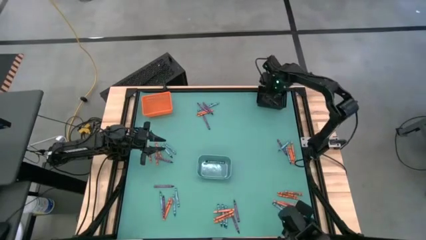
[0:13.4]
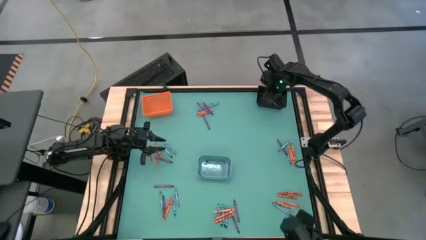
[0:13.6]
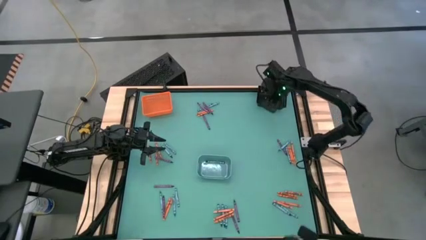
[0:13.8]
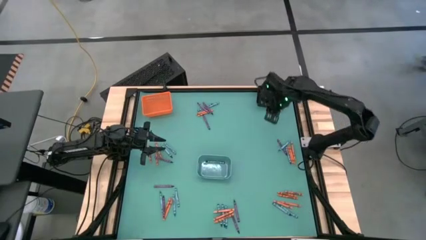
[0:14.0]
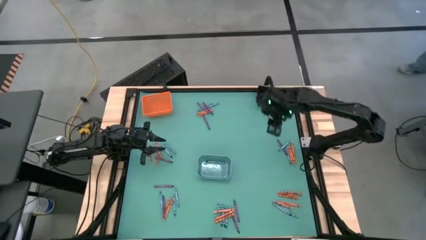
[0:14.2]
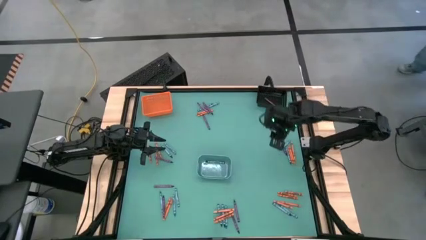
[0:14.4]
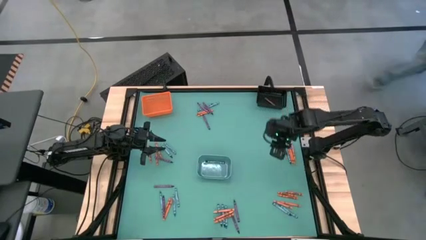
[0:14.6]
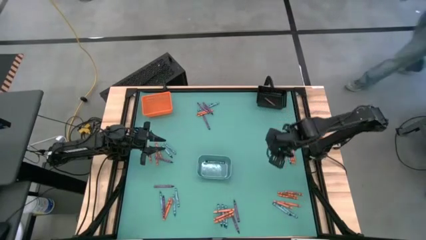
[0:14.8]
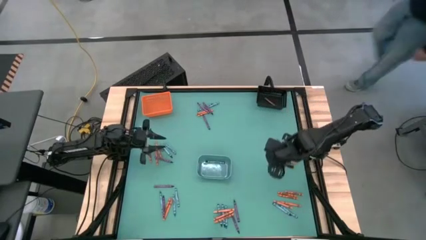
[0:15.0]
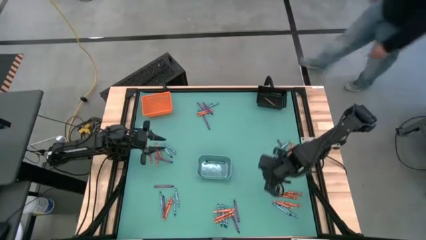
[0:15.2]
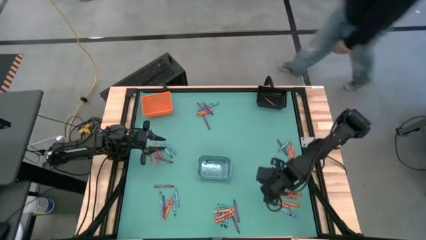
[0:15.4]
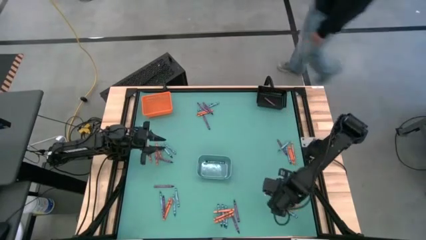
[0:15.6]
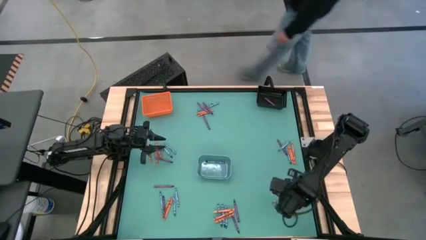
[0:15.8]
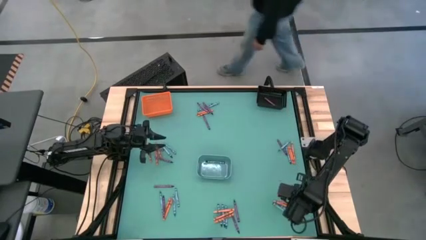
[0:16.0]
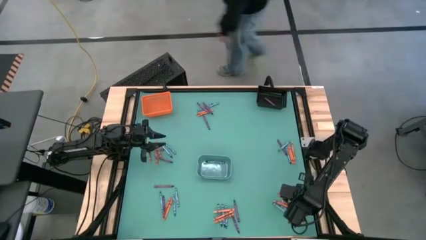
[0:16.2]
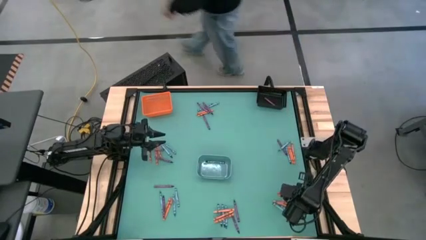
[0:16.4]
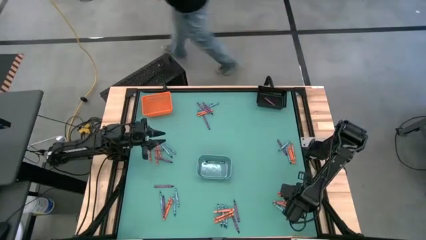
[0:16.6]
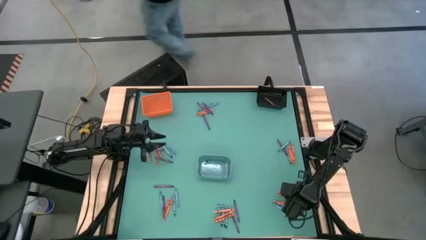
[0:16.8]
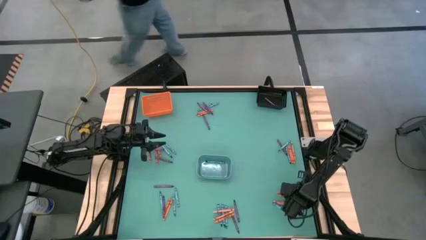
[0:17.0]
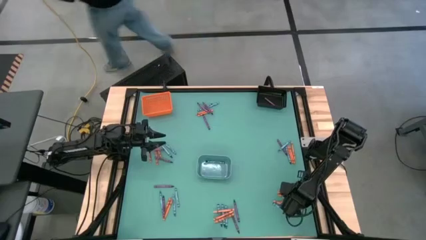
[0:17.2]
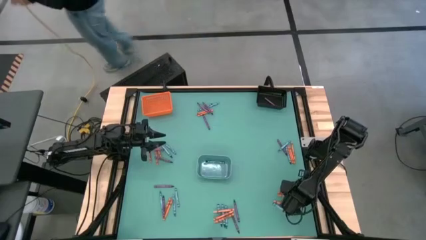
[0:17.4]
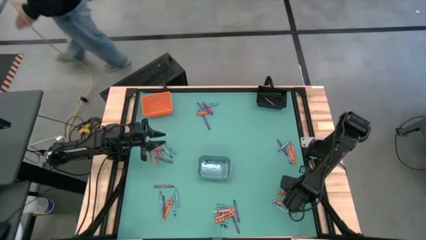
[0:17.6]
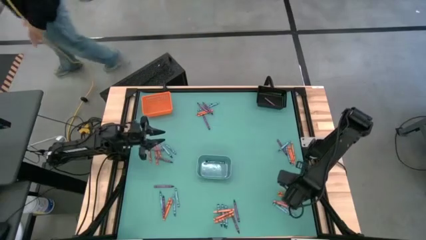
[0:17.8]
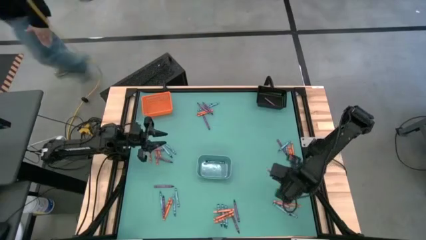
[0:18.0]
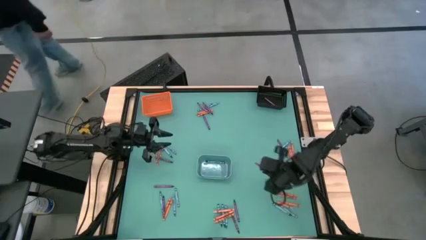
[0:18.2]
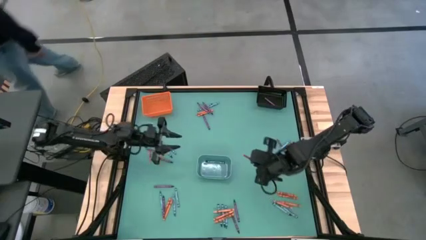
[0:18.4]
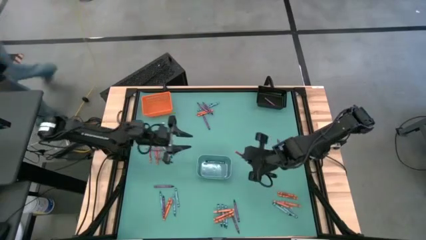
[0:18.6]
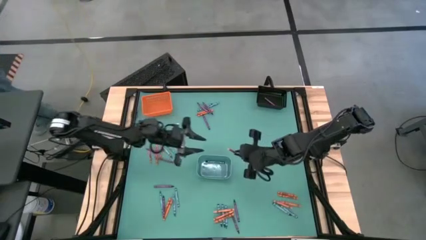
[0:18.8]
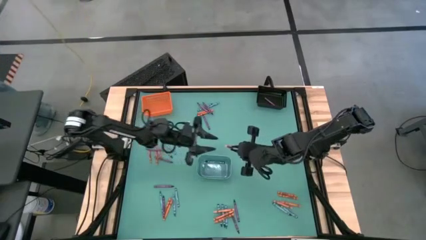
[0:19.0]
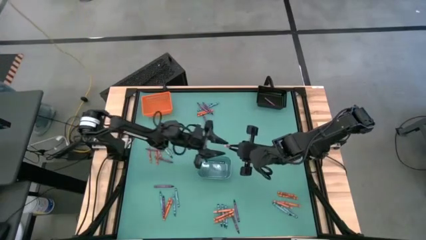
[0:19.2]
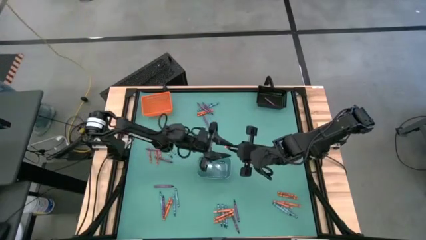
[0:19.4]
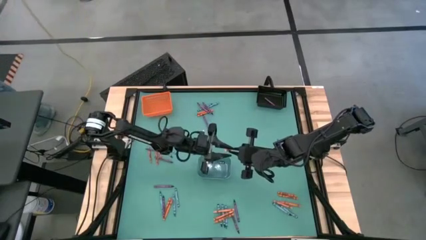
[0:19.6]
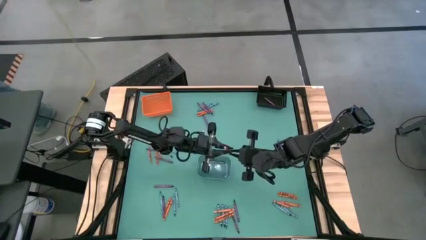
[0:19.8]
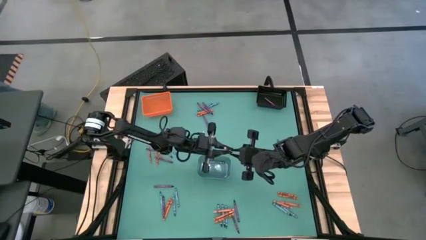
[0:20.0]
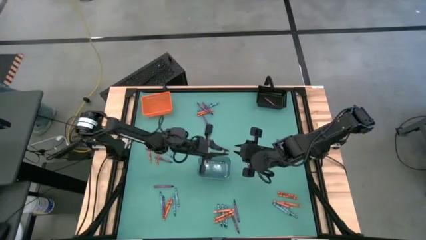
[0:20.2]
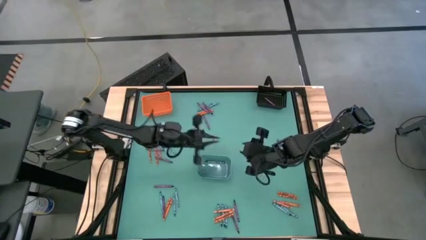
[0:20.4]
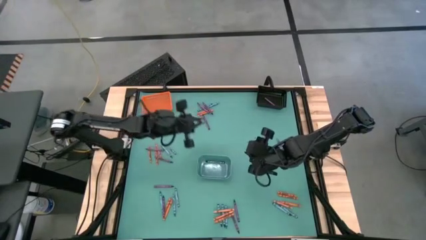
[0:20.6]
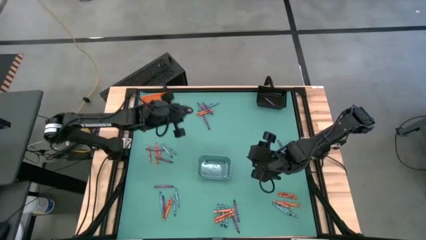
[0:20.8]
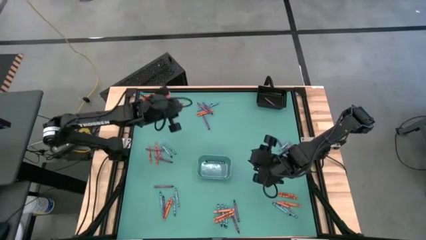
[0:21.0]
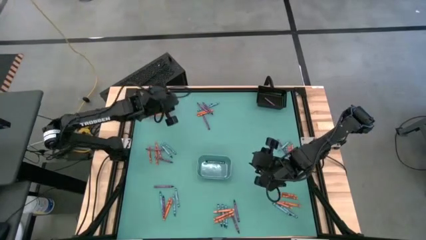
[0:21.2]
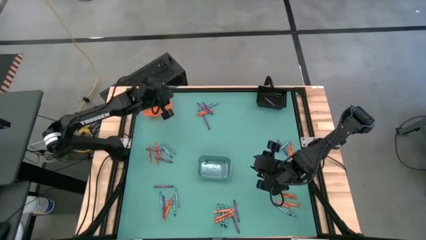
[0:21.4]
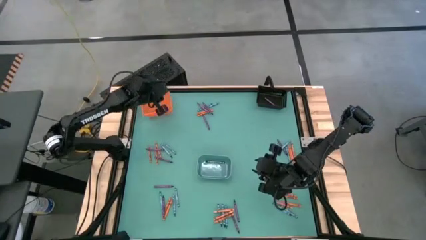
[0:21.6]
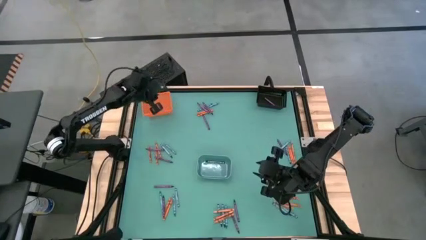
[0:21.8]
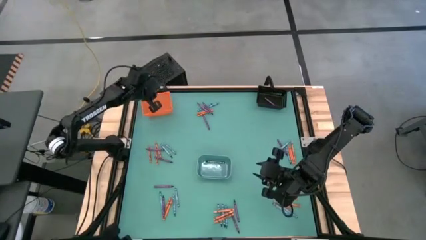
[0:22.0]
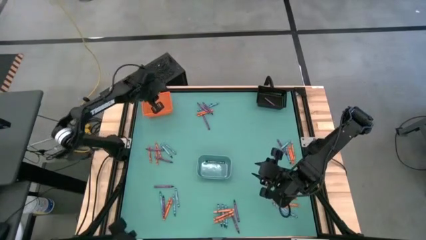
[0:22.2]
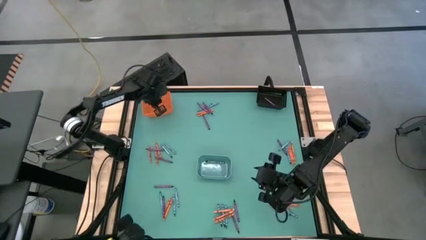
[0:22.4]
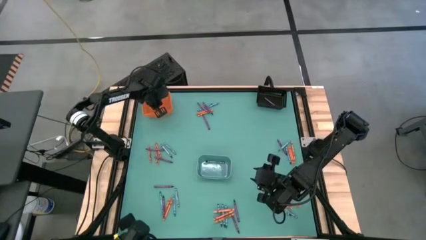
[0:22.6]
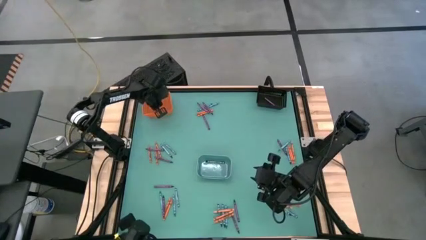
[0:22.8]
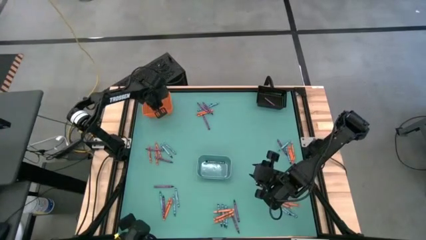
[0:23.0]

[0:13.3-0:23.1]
Task: Sort crayons
Put the orange crayon into the orange bin

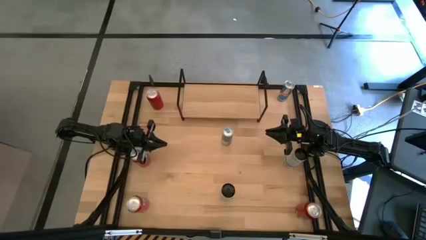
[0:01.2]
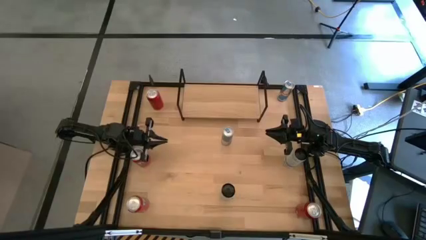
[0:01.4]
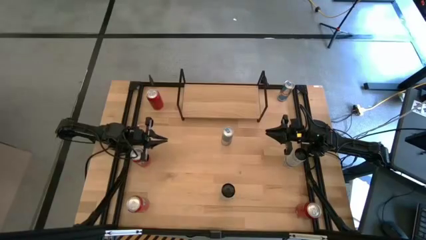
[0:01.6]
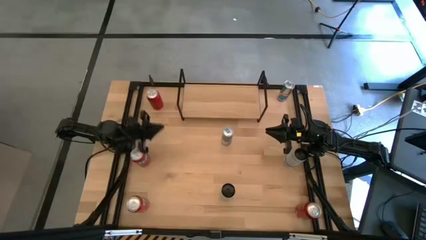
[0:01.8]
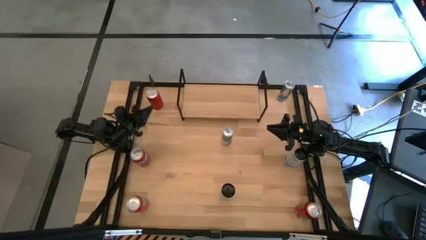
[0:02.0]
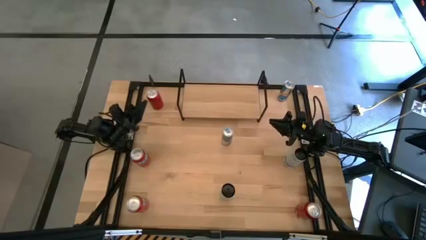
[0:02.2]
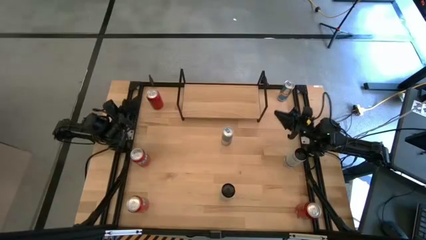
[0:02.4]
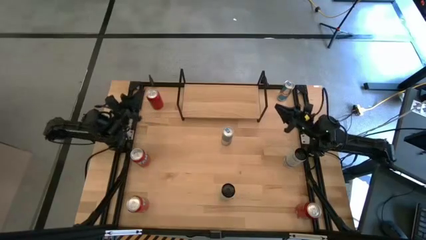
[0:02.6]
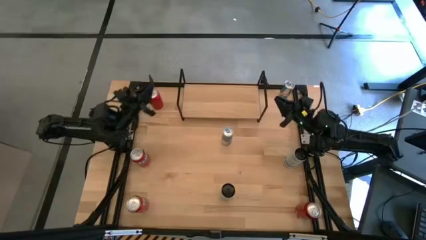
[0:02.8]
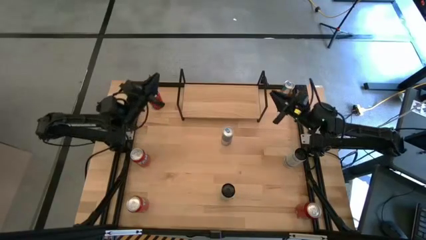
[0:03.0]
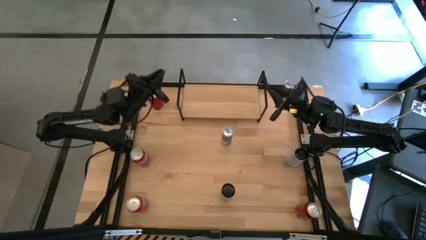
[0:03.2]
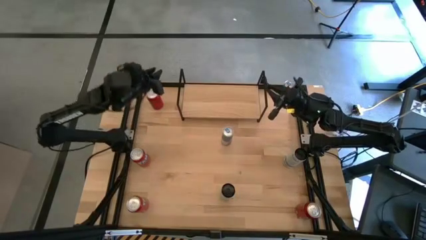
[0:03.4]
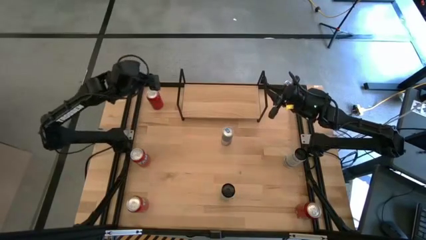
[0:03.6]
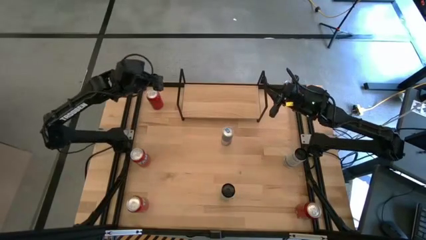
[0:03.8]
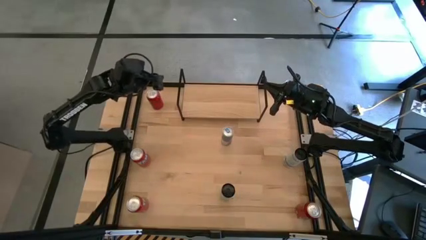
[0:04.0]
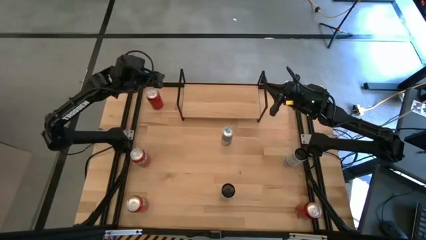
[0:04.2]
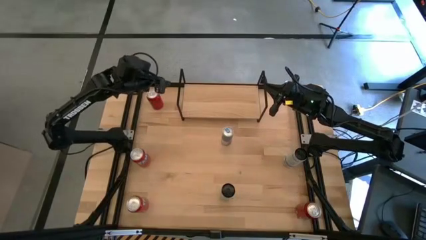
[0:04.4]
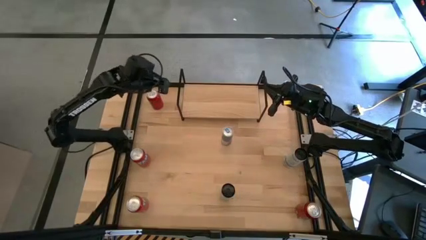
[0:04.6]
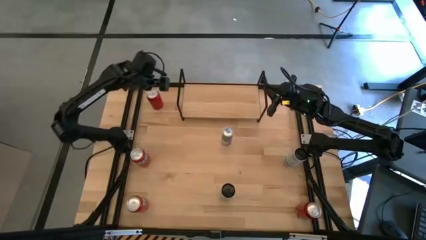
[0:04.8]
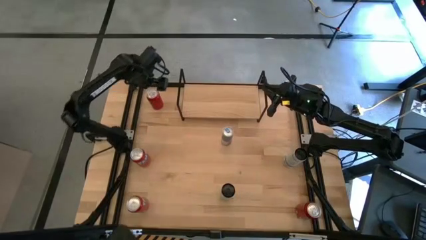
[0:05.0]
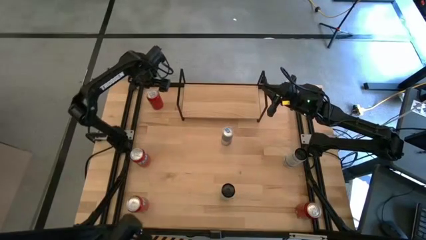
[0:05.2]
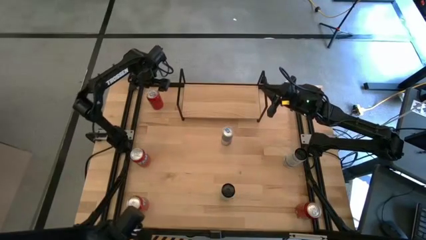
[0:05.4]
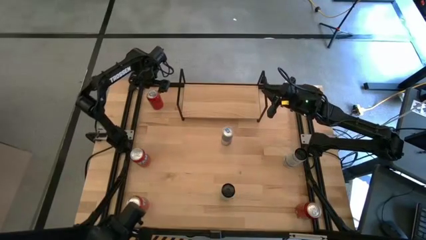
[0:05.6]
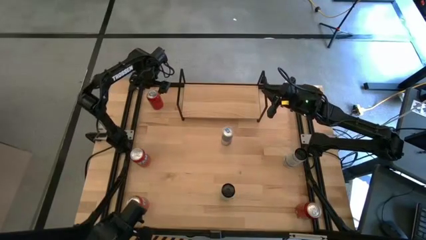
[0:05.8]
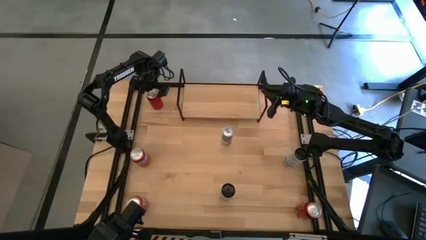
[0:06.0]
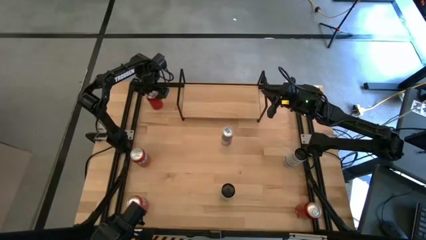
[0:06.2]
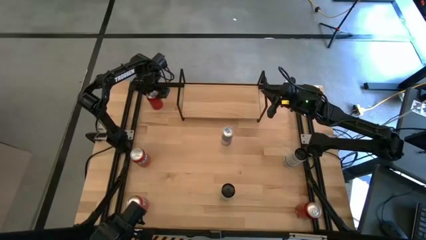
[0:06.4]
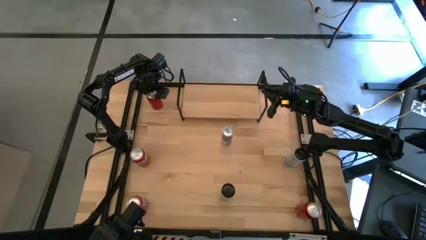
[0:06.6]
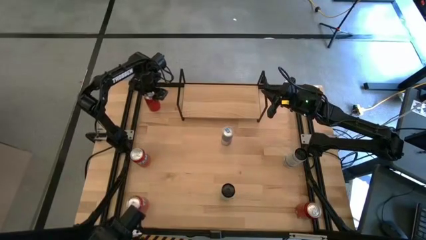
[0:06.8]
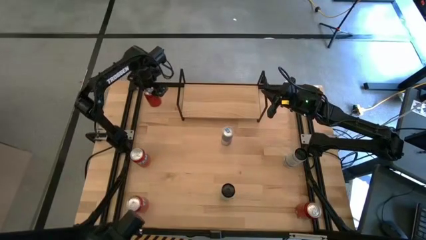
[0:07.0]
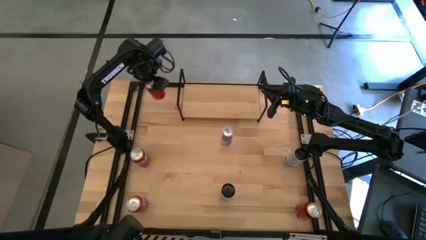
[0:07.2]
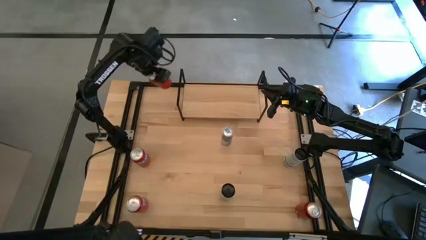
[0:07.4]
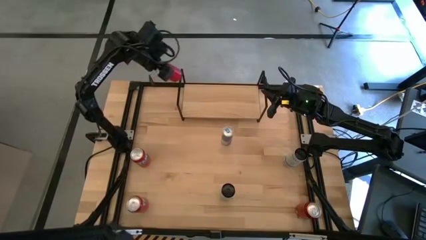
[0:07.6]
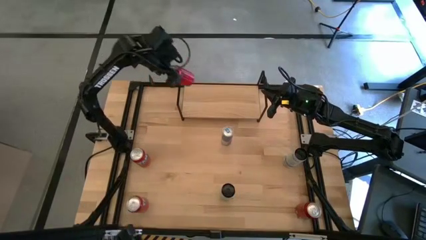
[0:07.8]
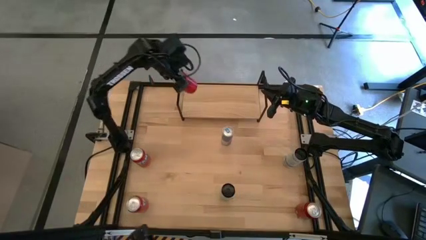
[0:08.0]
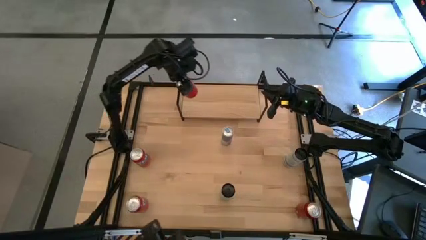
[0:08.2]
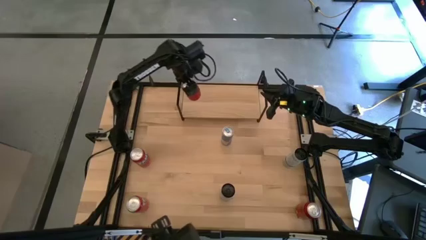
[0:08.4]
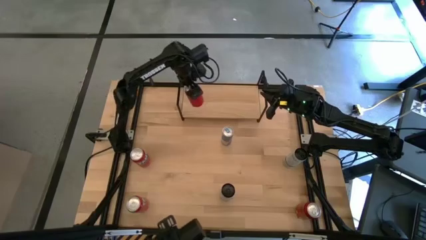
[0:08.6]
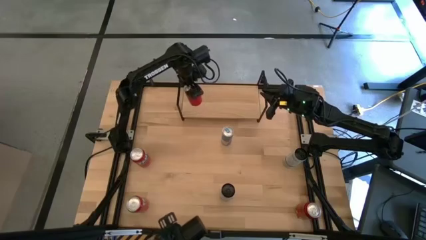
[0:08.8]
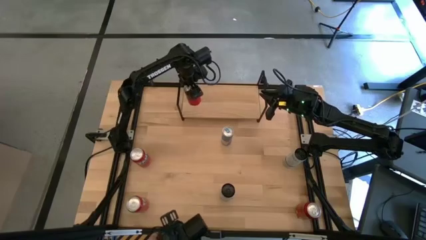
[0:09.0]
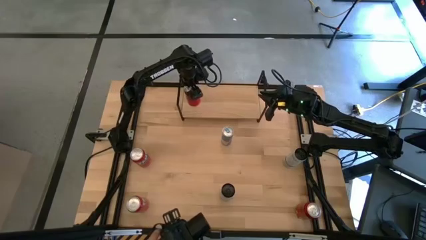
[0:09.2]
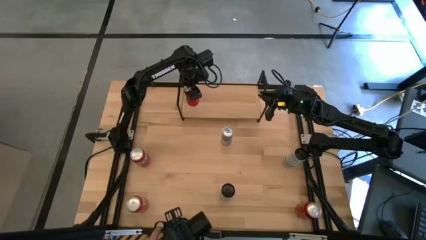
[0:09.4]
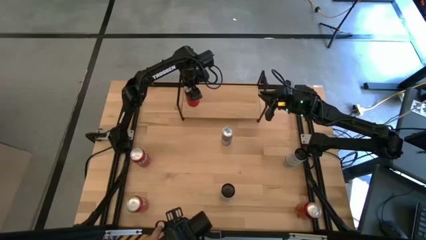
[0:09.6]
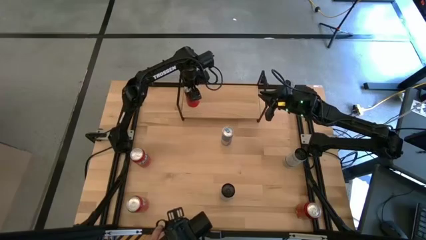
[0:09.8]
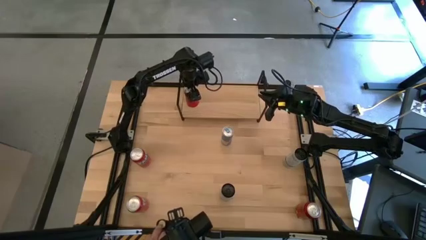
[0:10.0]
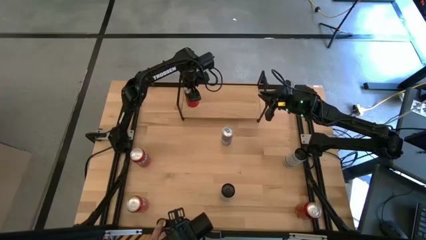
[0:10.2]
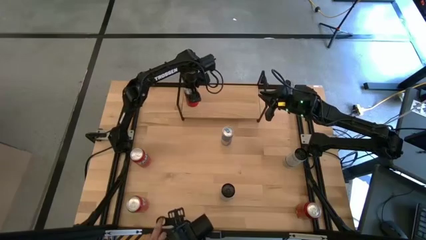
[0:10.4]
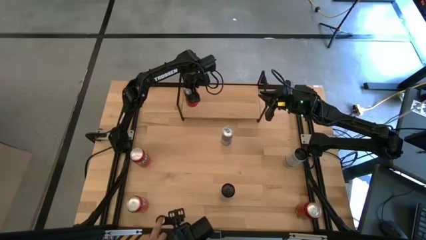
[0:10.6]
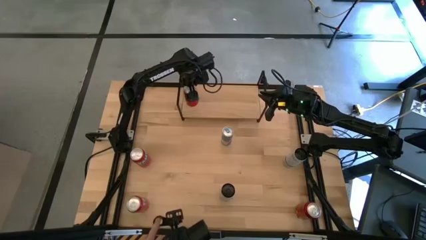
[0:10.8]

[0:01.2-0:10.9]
Task: Place canned beverage on shelf
Put the top red black soda can on the shelf
